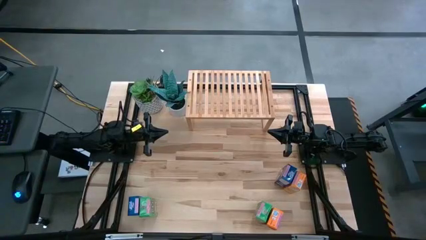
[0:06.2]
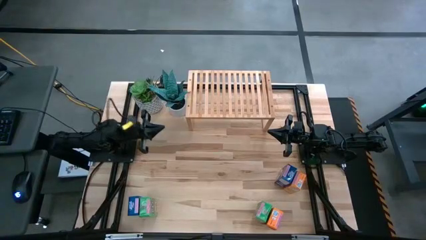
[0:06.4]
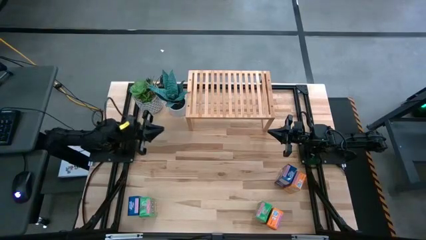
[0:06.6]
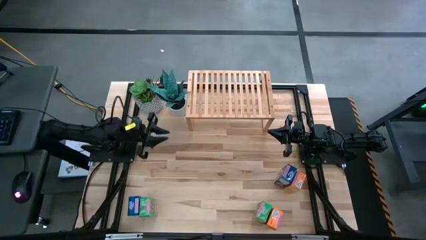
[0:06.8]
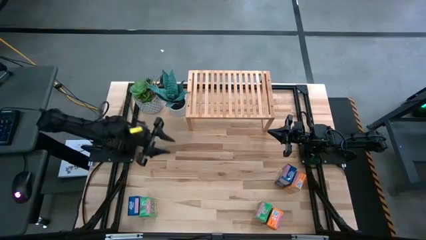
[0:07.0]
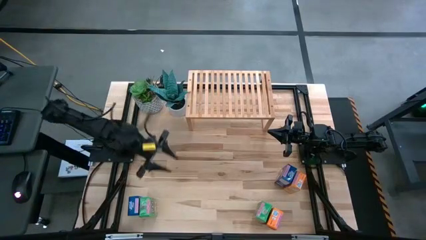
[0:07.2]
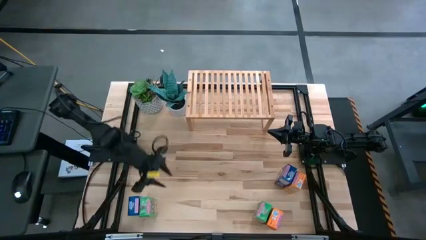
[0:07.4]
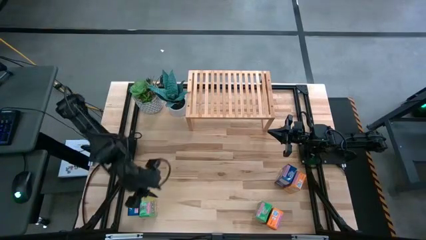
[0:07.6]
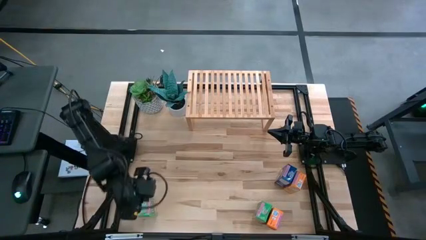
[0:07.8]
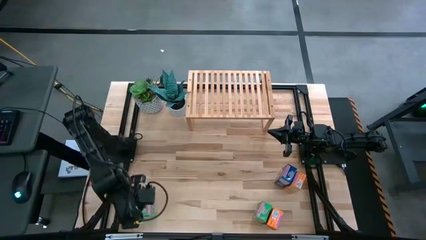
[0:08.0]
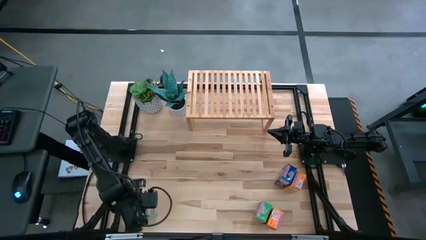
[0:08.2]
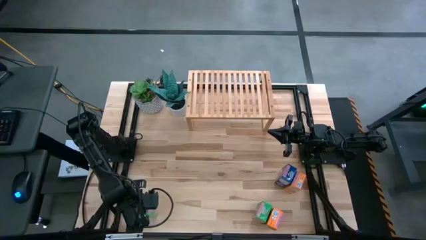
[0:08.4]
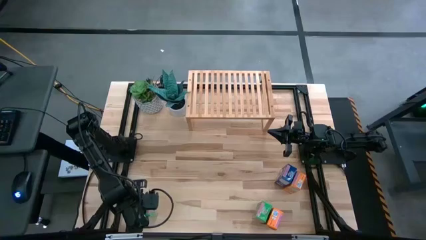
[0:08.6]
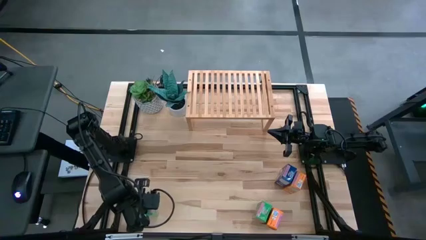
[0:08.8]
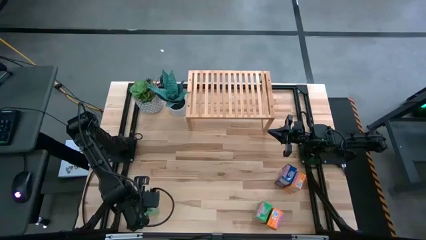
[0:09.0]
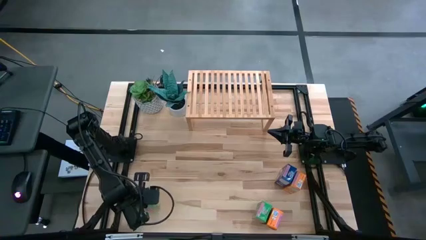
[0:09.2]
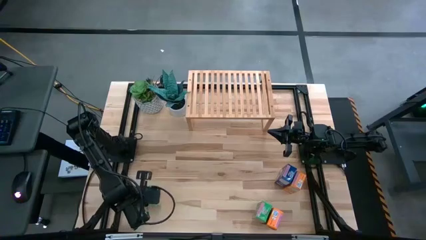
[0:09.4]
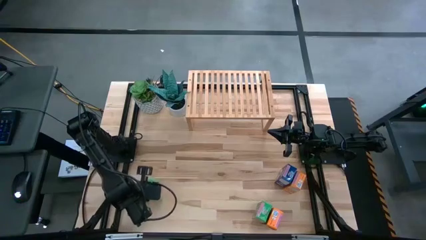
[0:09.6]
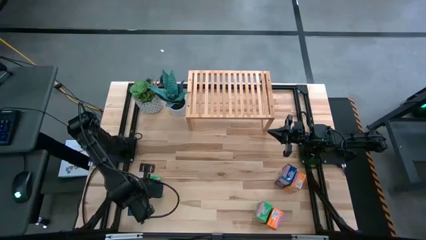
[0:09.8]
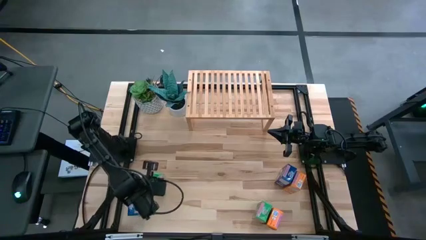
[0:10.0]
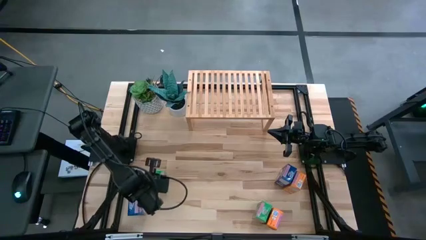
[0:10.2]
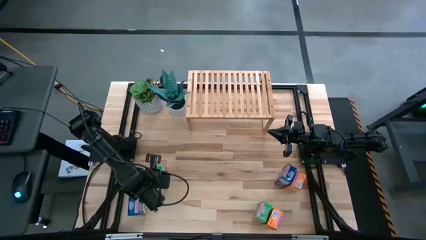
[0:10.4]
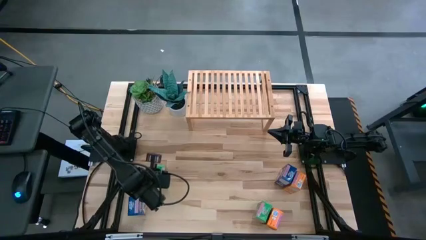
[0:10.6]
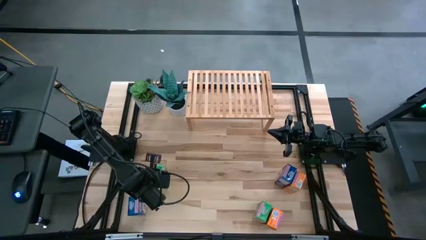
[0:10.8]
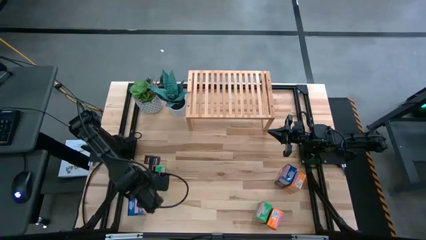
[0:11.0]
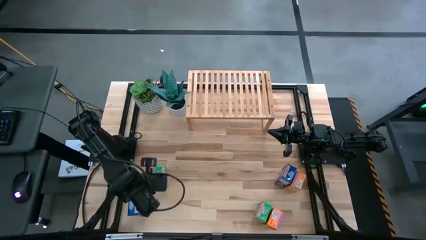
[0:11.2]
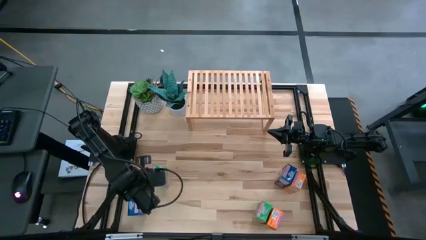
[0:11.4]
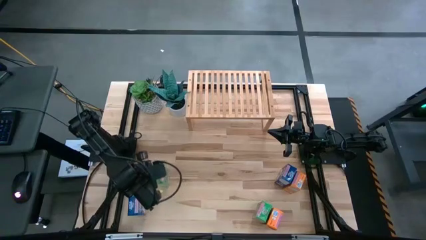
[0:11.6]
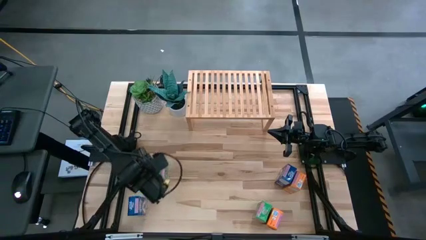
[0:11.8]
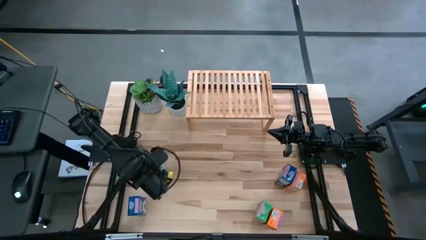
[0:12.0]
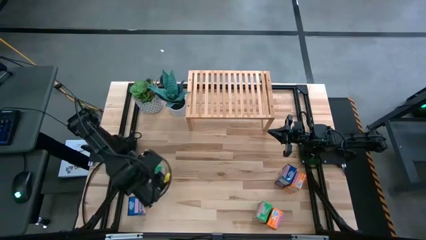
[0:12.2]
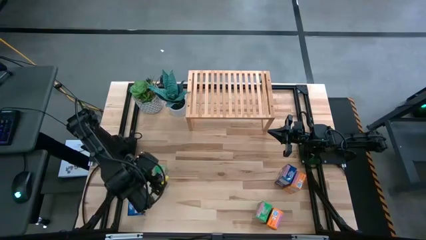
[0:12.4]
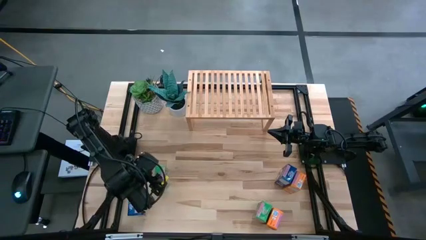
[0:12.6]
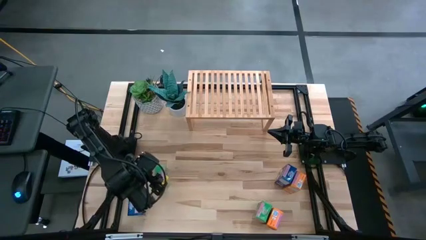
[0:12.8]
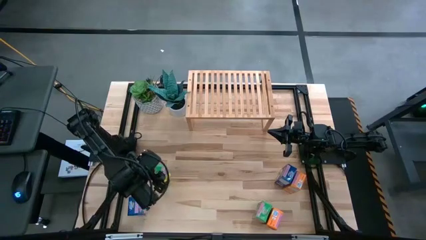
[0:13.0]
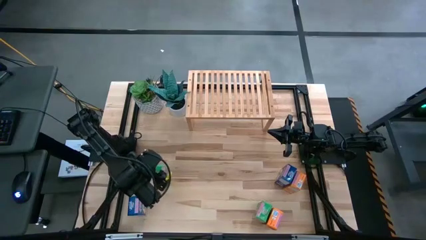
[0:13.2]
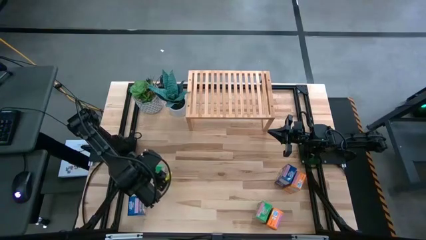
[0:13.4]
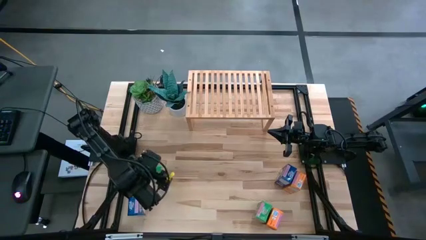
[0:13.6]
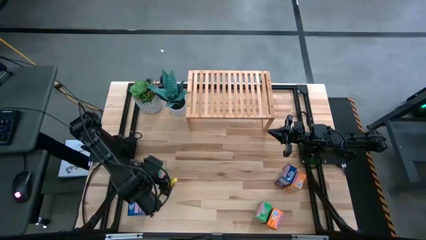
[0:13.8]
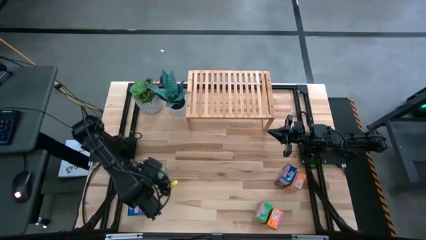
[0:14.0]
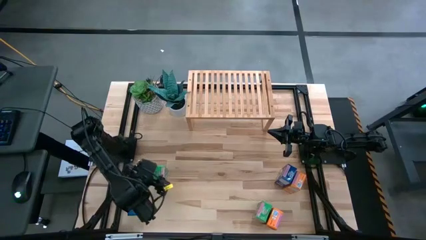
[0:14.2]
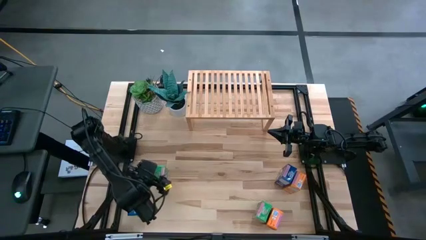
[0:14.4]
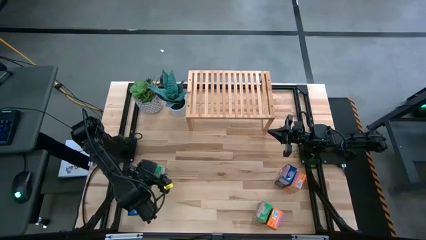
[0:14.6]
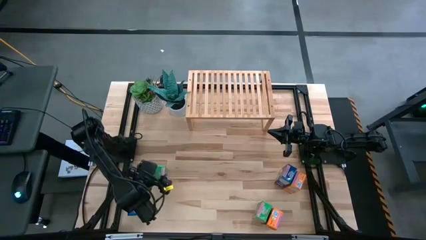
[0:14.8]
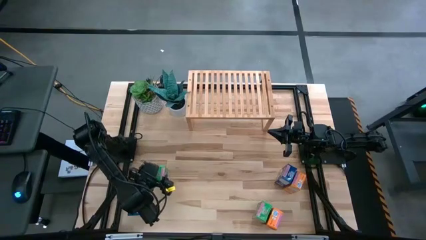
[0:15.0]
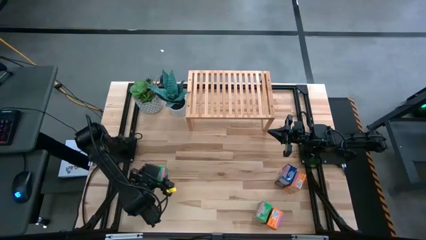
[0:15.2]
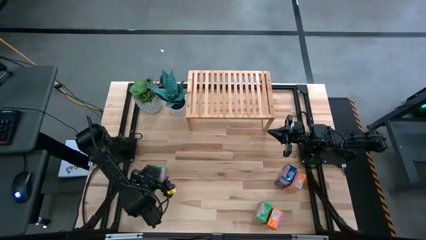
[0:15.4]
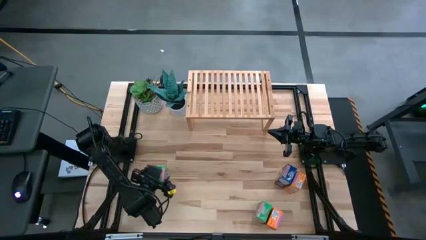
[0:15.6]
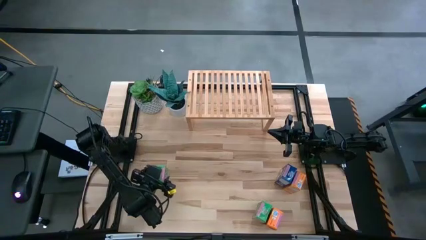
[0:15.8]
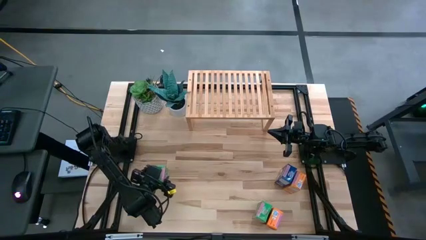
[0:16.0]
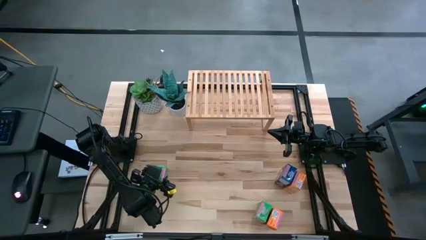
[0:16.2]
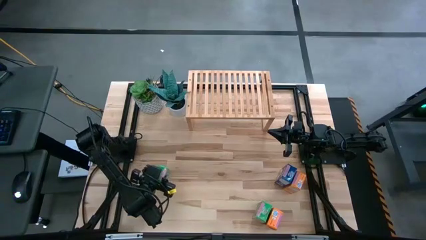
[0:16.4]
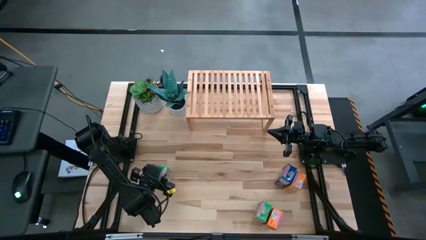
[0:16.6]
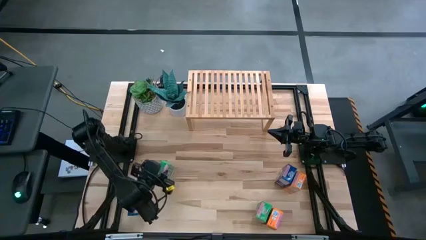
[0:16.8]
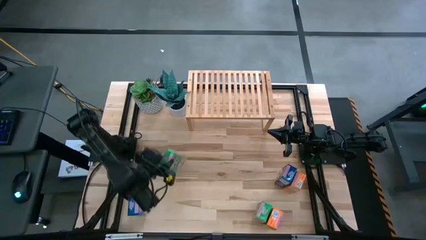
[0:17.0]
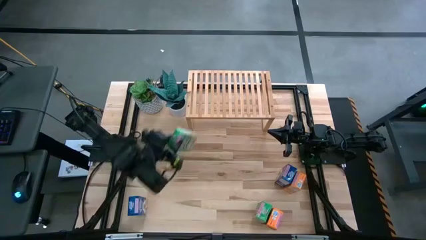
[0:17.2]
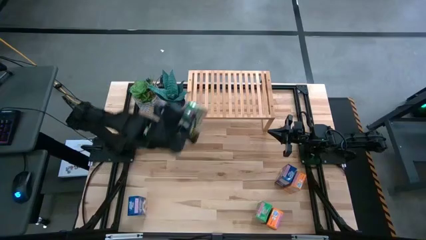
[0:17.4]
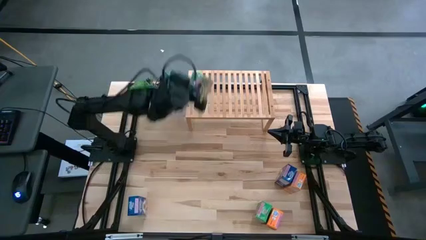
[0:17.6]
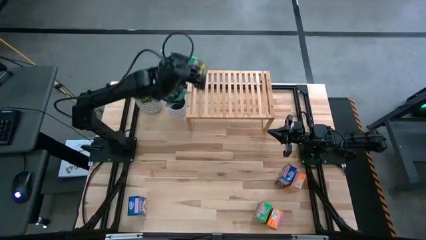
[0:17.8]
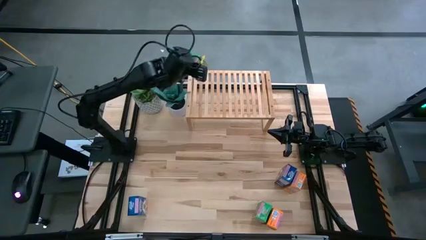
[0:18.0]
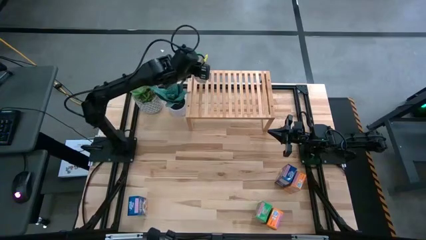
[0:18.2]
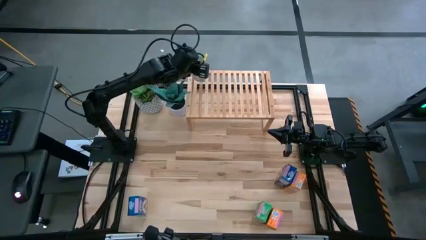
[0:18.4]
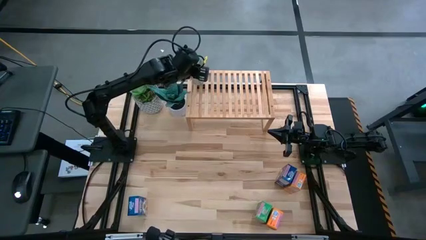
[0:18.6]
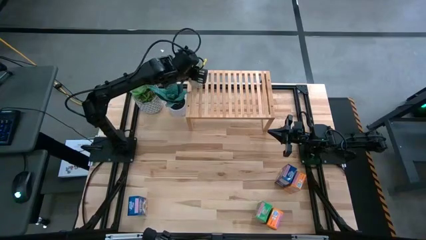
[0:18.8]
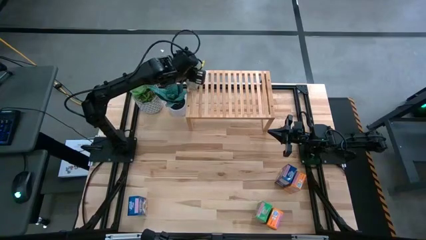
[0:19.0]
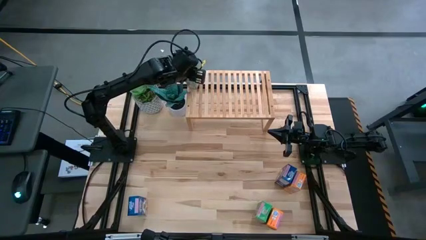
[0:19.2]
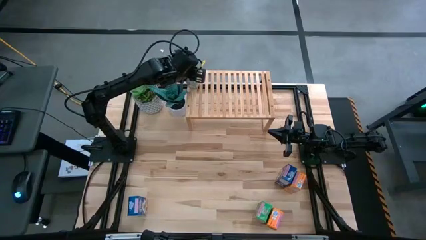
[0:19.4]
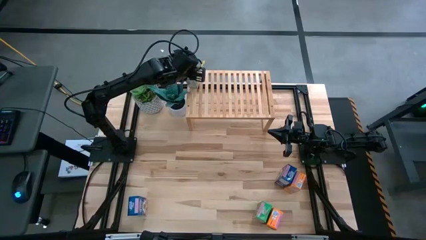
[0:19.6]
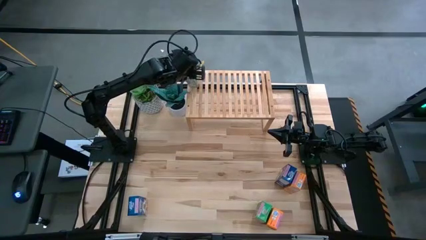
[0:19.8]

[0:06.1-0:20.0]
Task: Stack cereal on shelf
Put the left green cereal box on the shelf
